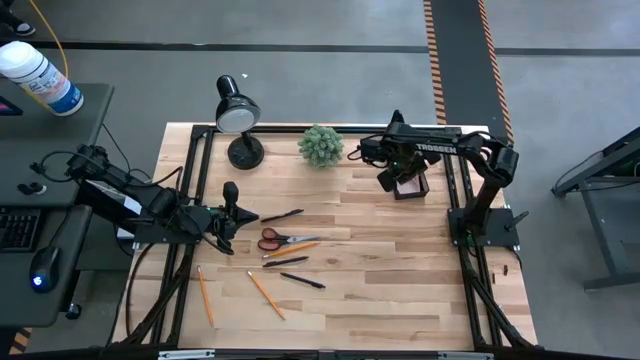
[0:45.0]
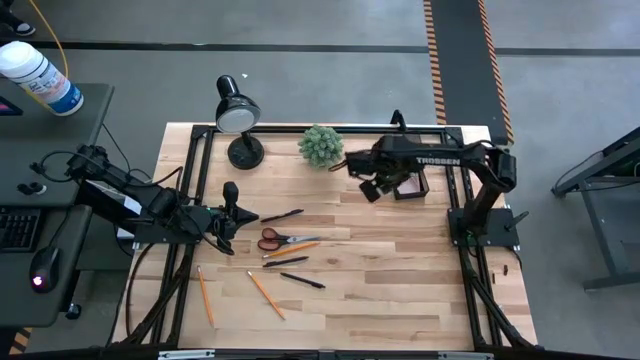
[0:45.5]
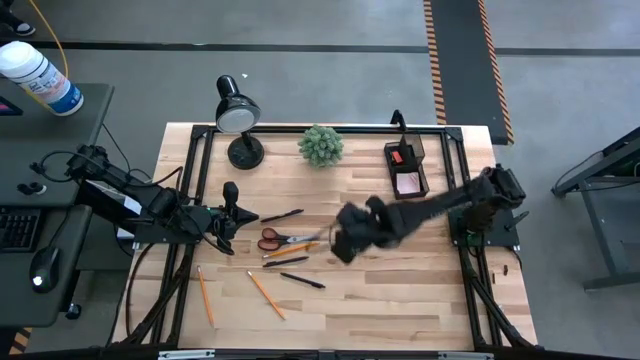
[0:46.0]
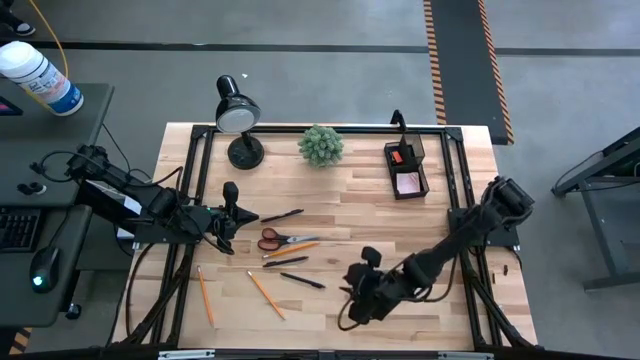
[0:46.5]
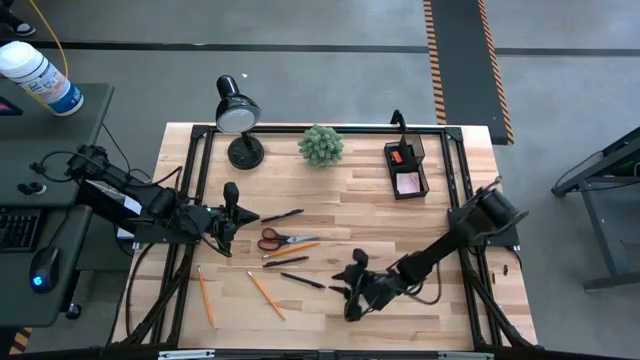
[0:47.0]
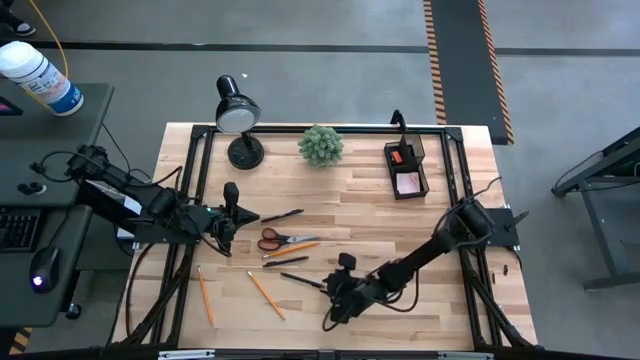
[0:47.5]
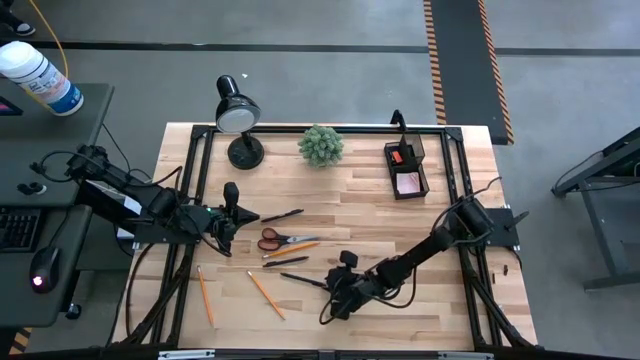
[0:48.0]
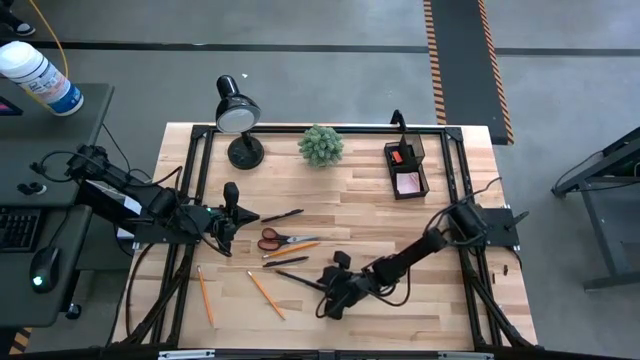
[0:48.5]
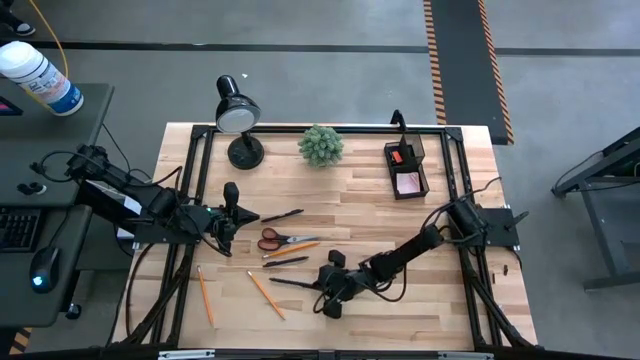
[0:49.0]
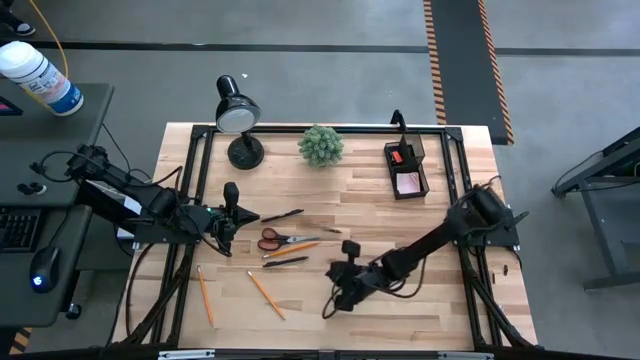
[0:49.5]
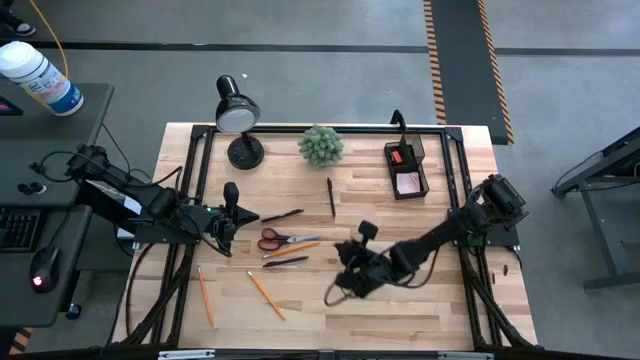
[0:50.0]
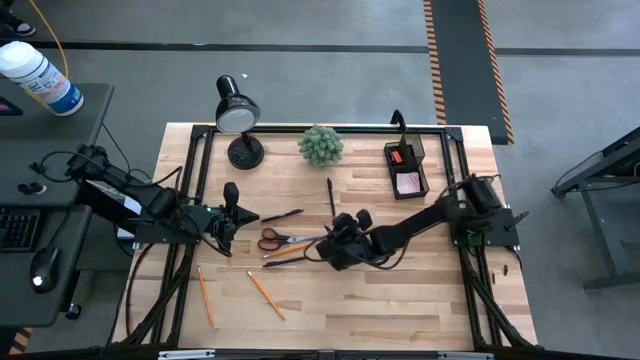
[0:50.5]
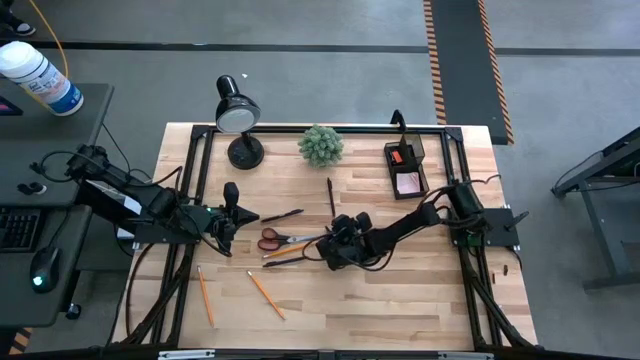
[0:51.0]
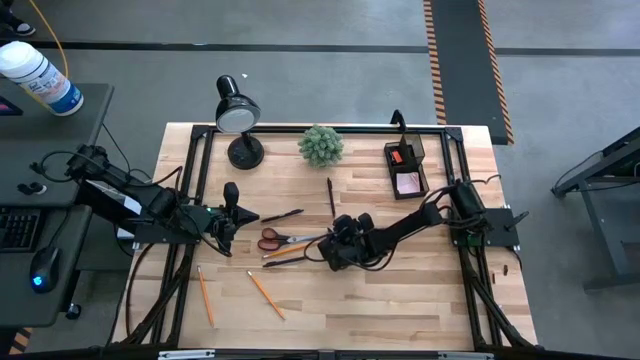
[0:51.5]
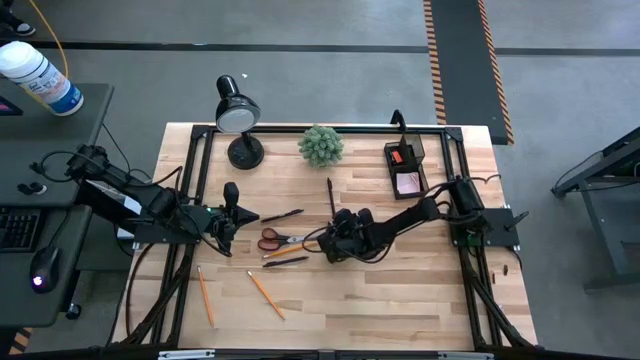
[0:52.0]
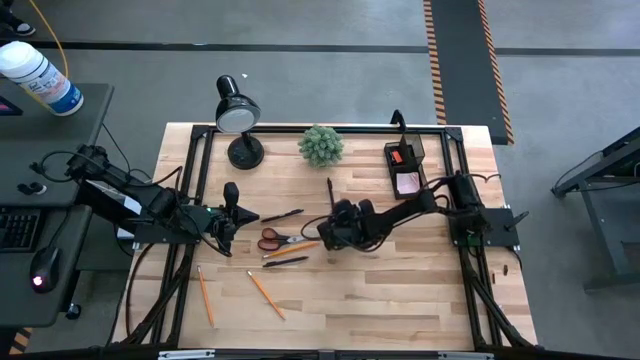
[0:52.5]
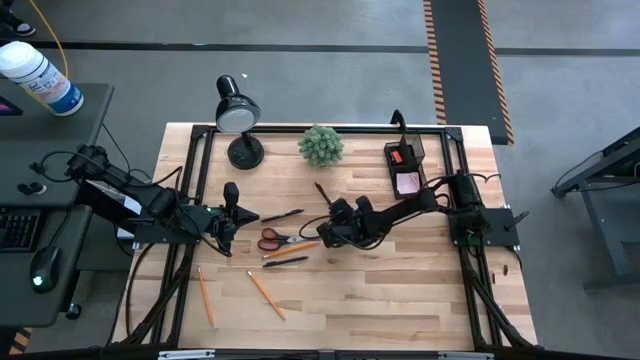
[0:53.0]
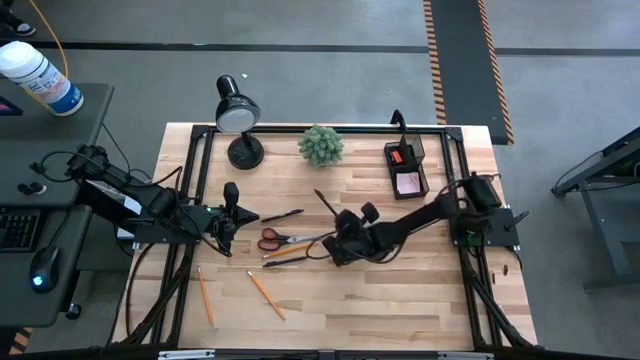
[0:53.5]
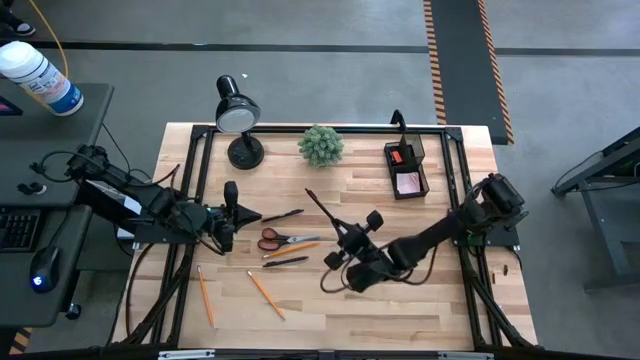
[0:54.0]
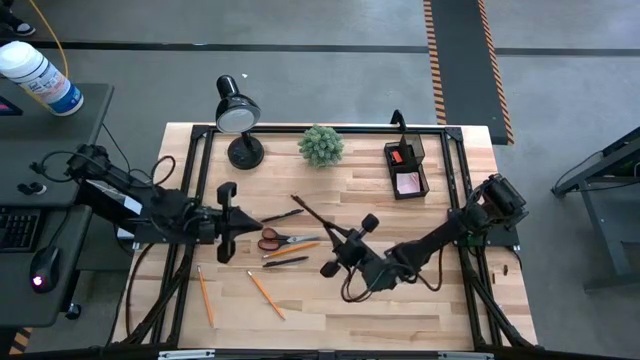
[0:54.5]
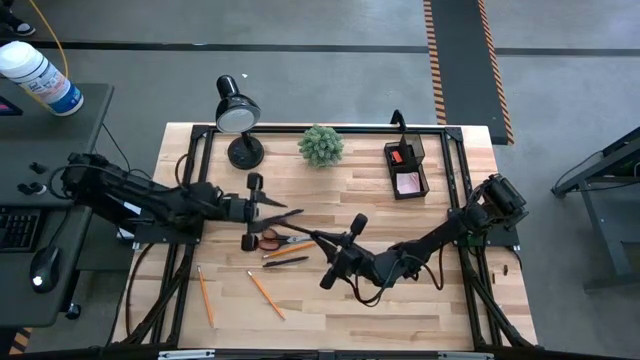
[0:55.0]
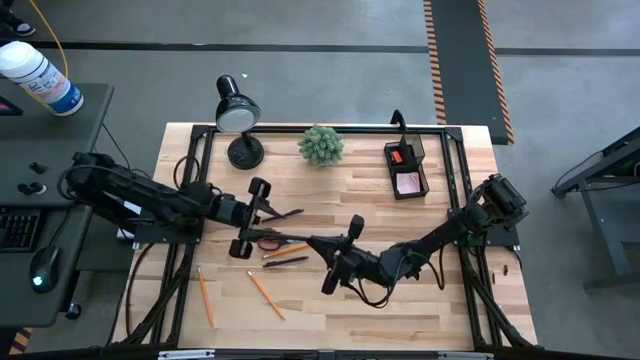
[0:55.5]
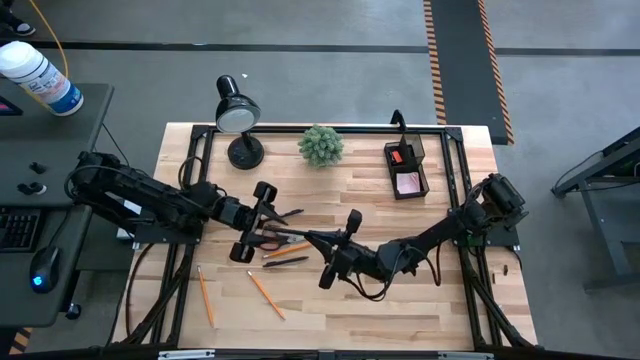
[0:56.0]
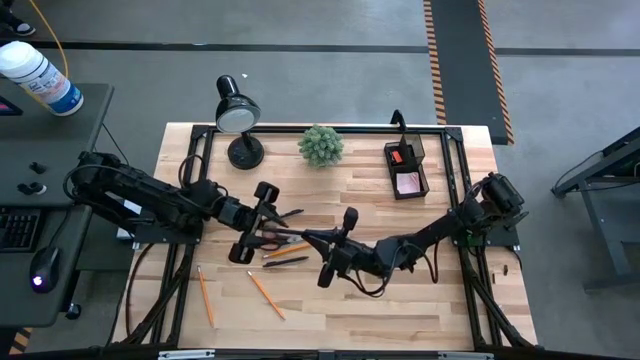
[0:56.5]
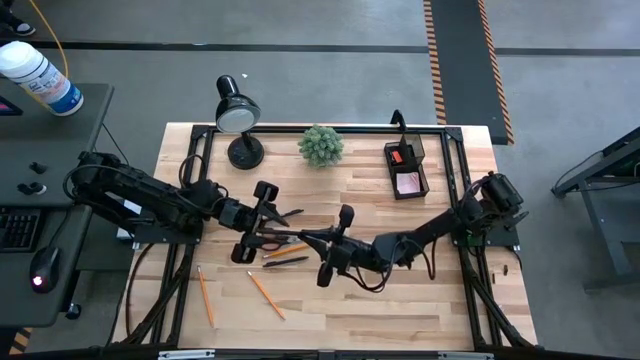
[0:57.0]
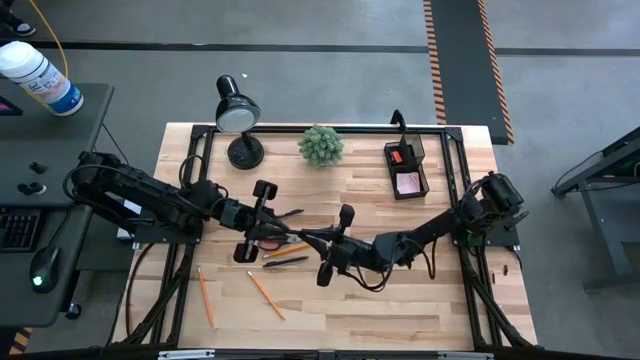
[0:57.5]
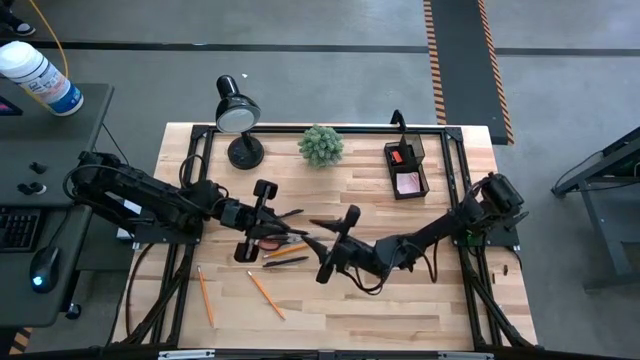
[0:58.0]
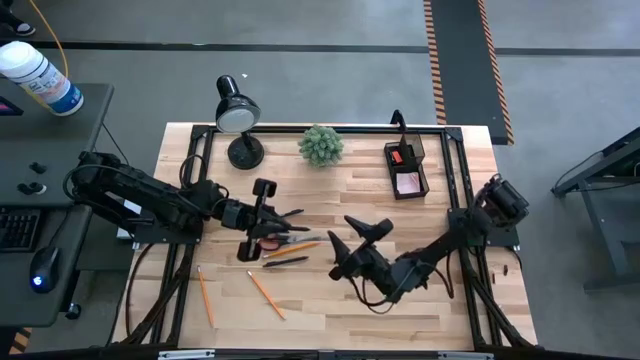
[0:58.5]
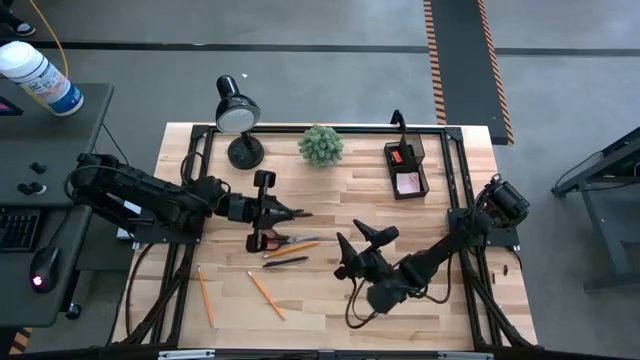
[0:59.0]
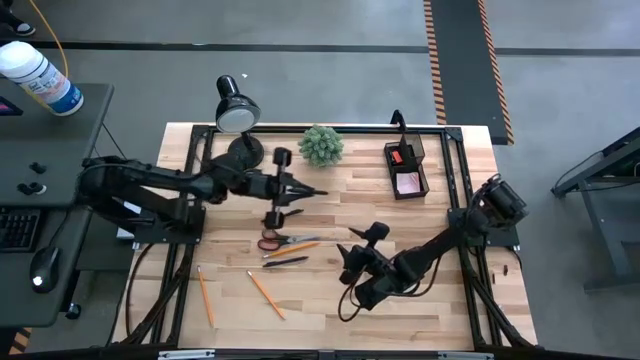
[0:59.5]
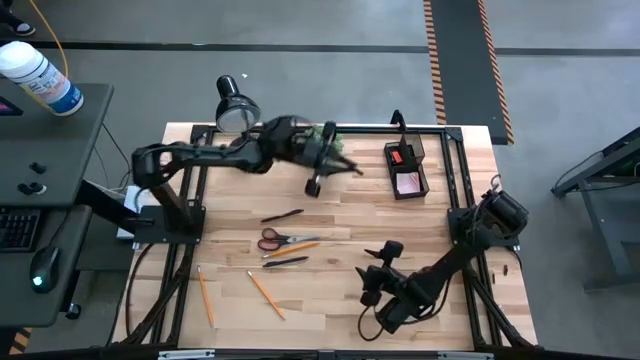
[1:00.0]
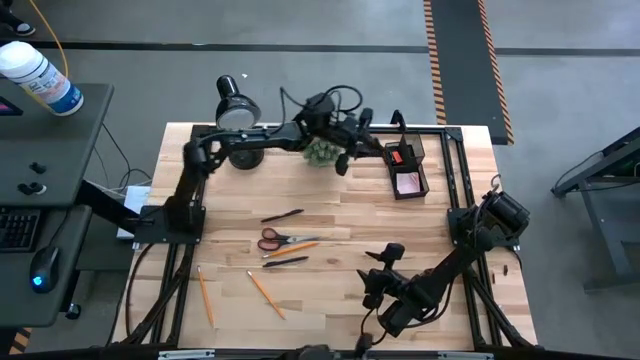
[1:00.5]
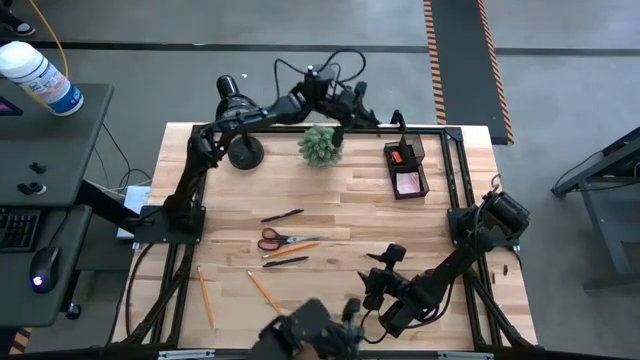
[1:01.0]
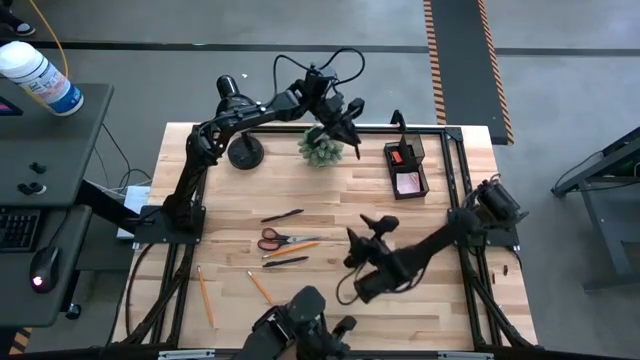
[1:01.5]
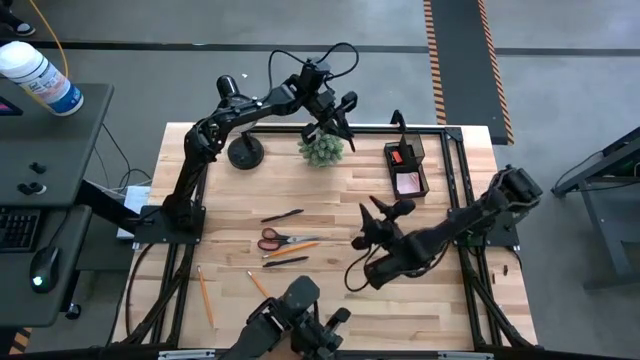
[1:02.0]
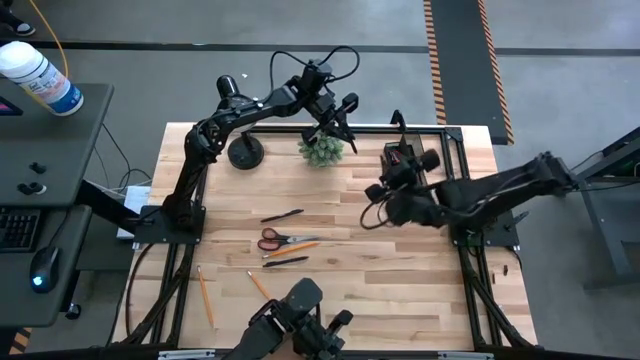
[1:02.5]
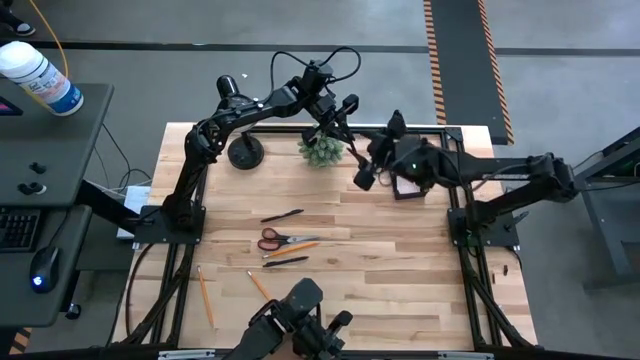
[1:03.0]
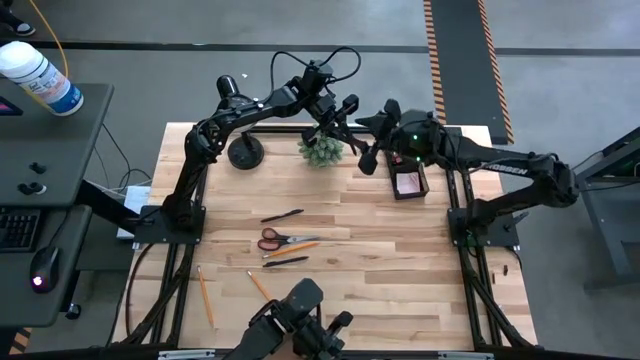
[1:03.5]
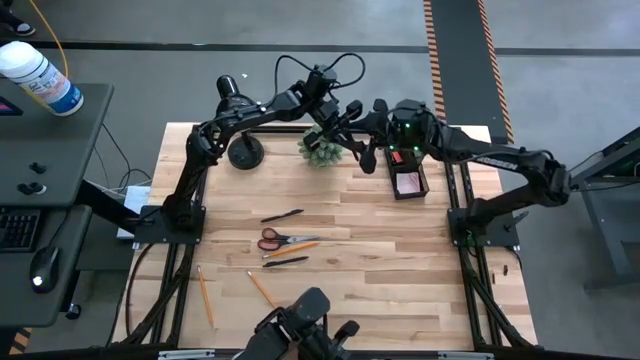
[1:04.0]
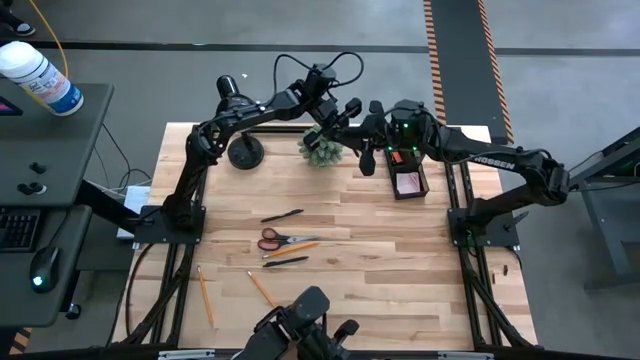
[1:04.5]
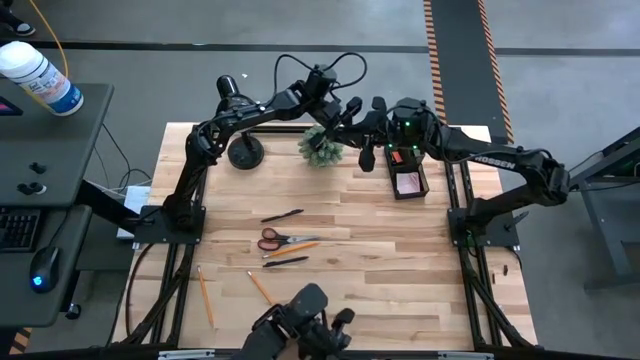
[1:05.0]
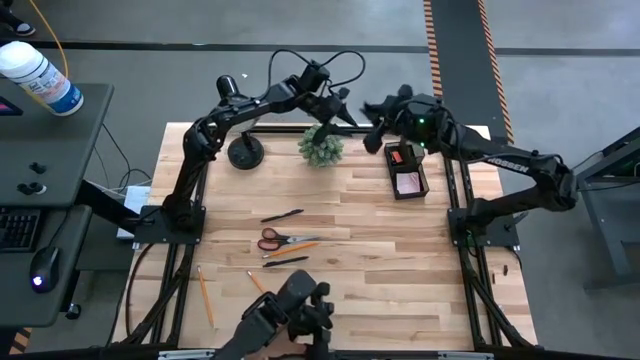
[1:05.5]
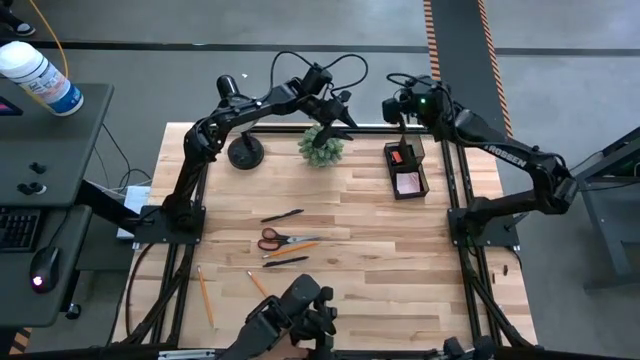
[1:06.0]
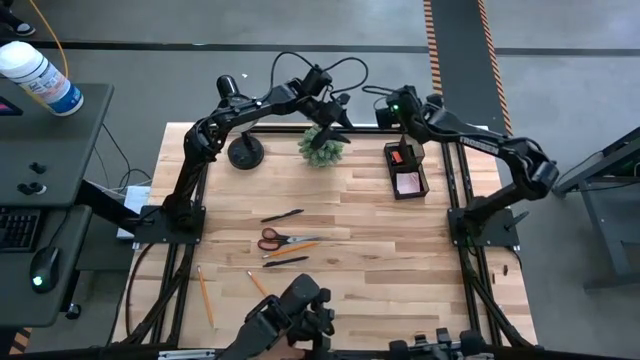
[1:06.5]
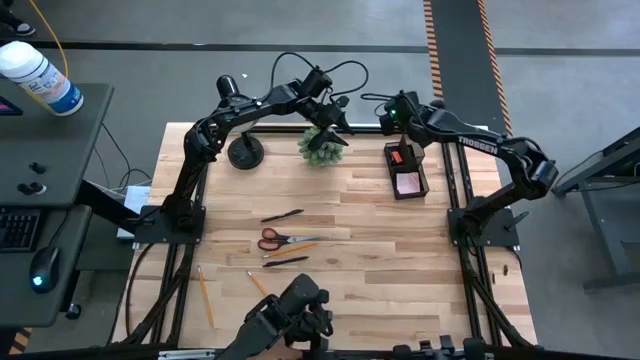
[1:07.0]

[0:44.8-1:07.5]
Task: Pick and place office supplies into organizer
Put the bottom ballpen into the desk organizer
